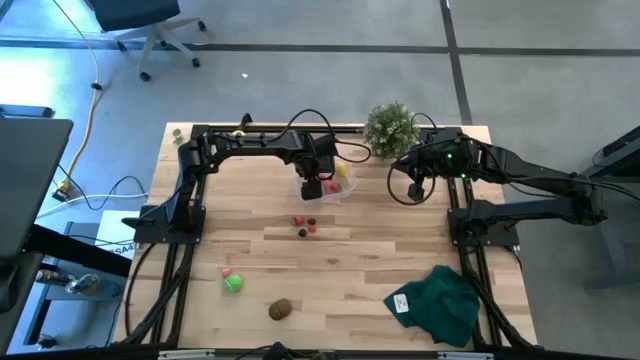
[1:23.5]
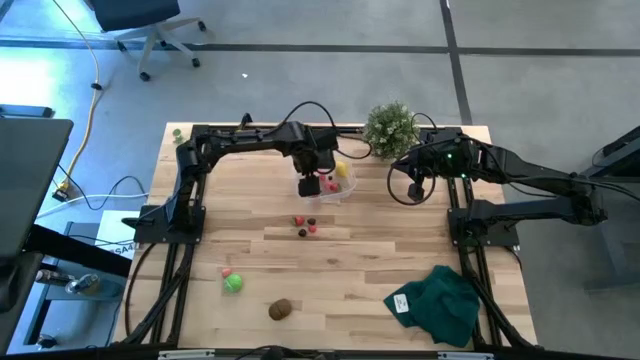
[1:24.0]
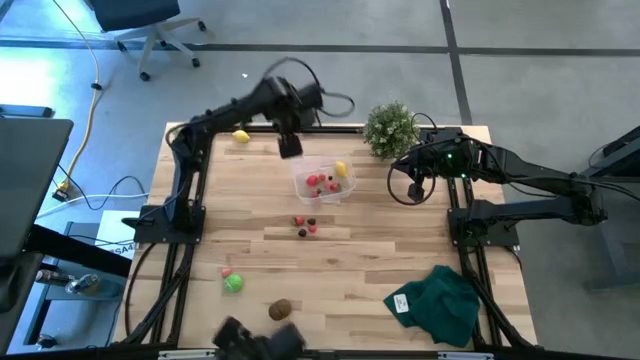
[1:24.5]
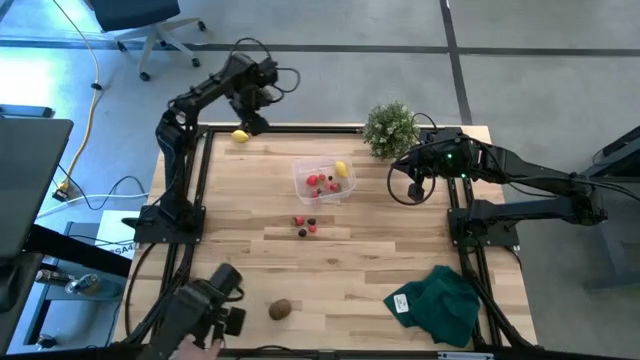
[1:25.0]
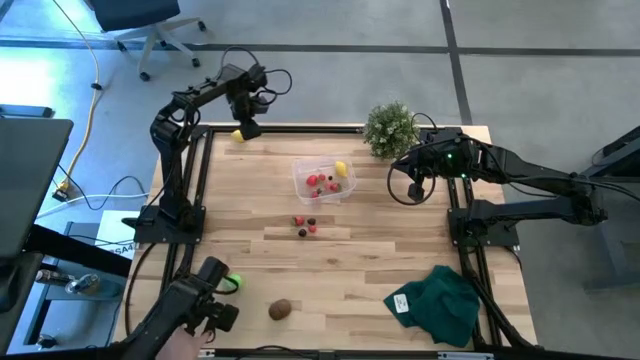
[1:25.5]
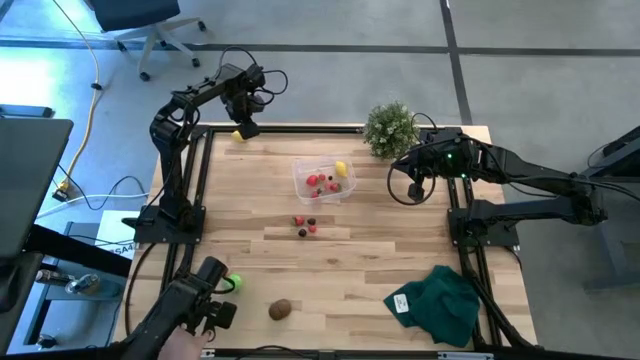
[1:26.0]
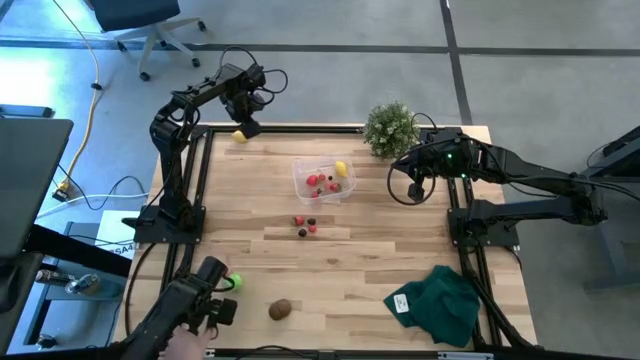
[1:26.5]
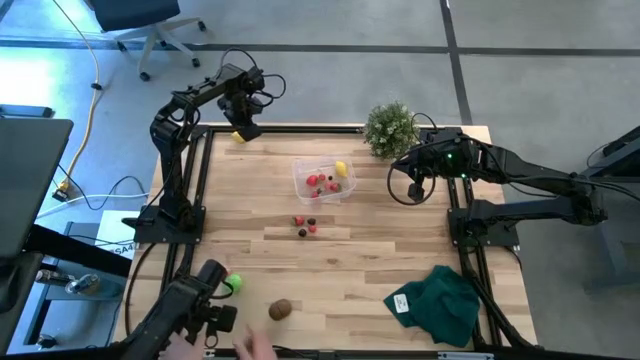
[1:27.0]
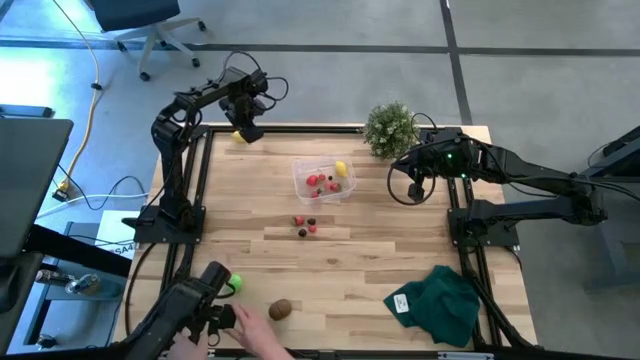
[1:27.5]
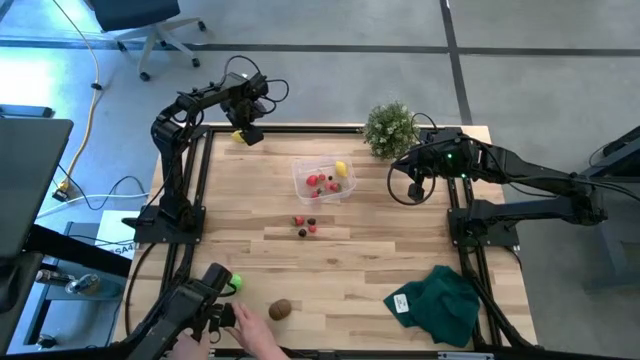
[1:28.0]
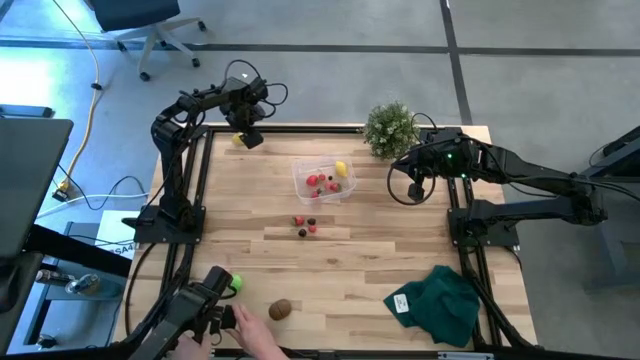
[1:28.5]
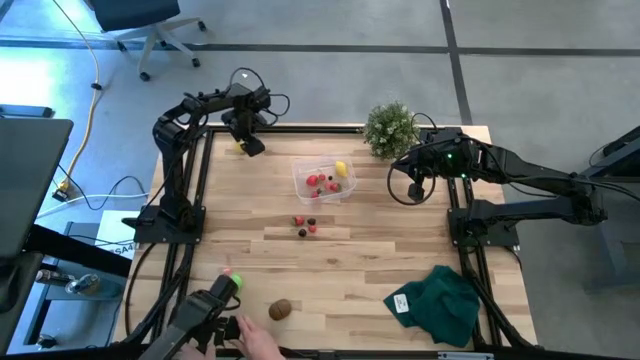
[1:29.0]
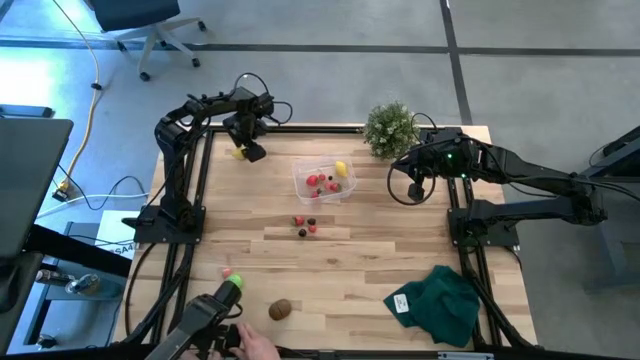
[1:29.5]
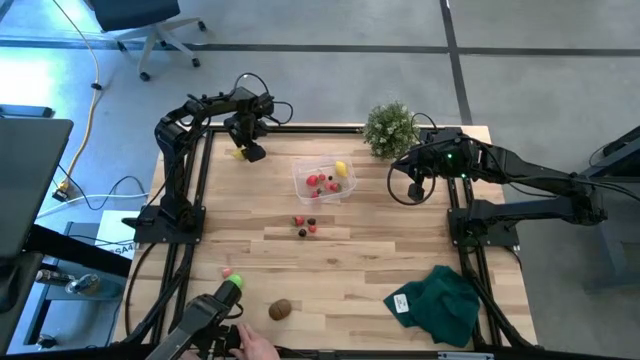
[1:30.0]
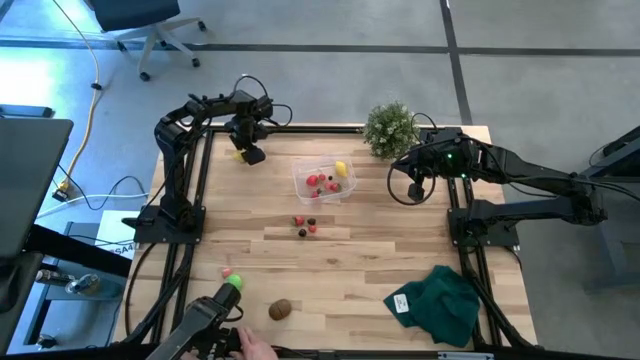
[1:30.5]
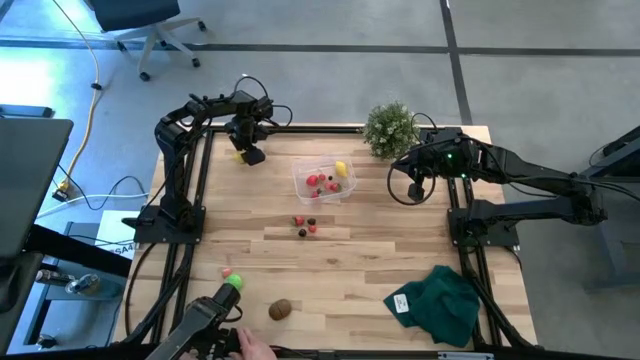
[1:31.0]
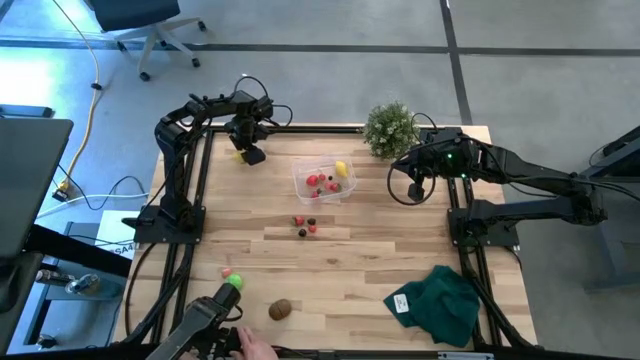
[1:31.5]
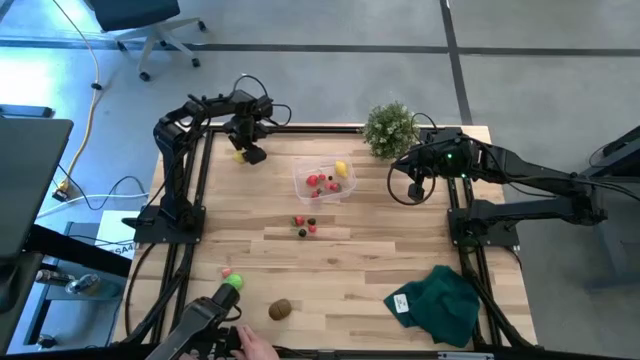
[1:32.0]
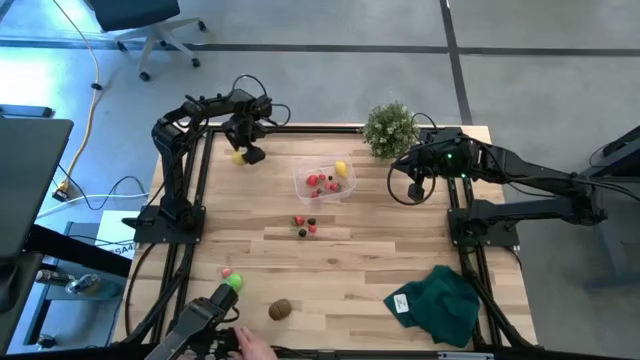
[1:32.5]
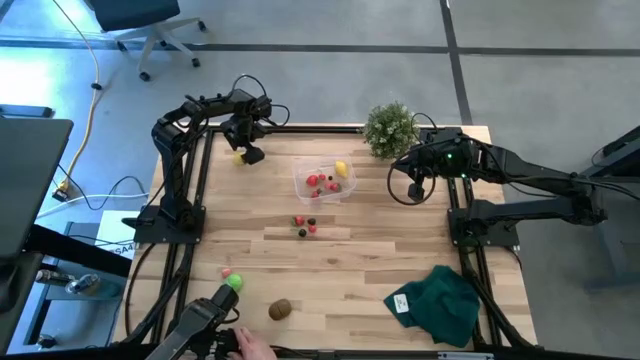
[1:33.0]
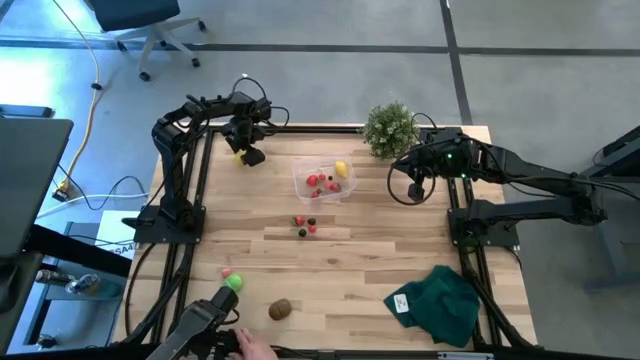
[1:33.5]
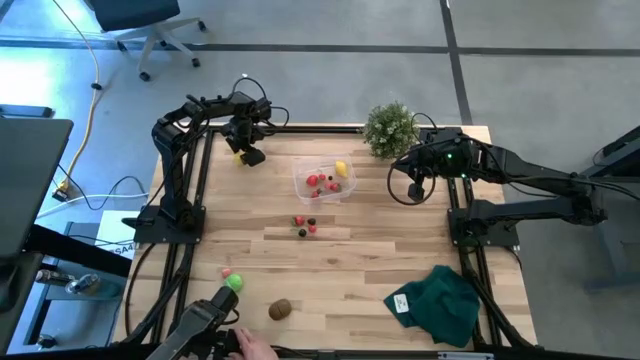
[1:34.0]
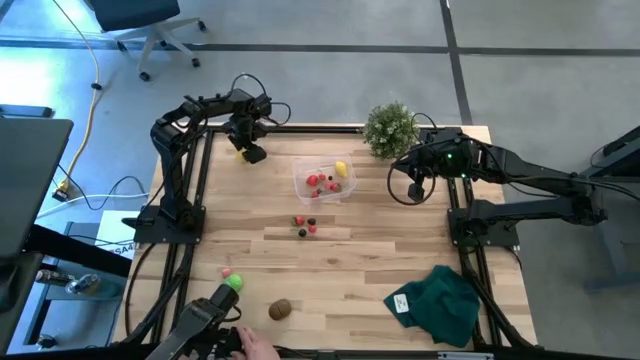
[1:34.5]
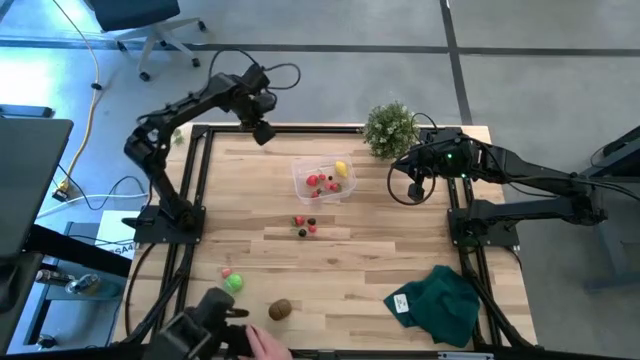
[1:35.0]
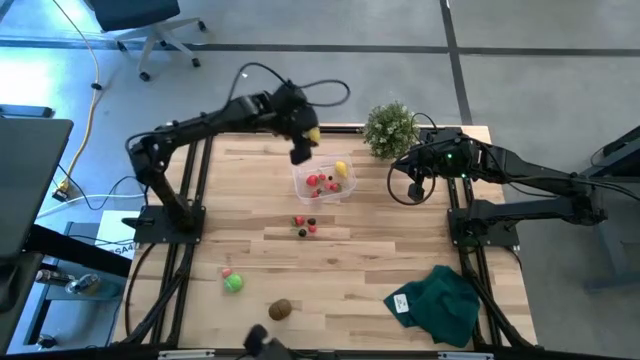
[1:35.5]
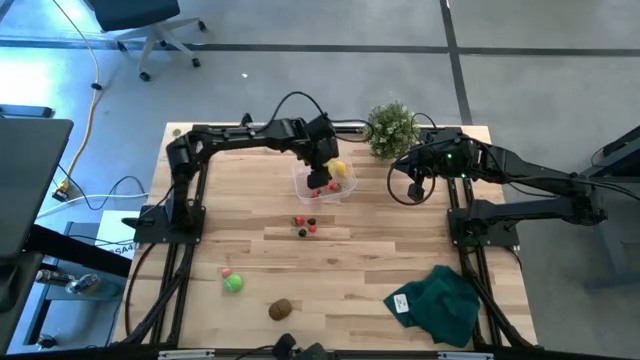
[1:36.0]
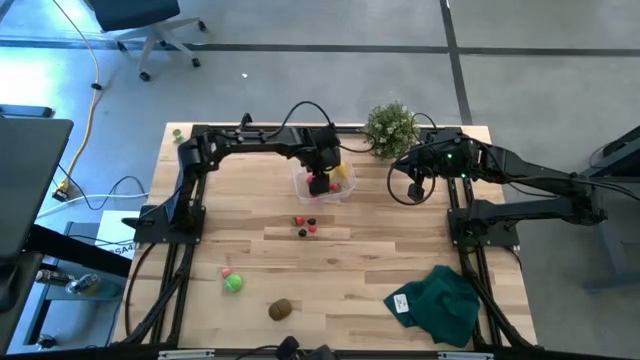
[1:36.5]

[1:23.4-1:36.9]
Task: Pick and placing Produce into tupperware
Put the yellow lemon into the transparent bin

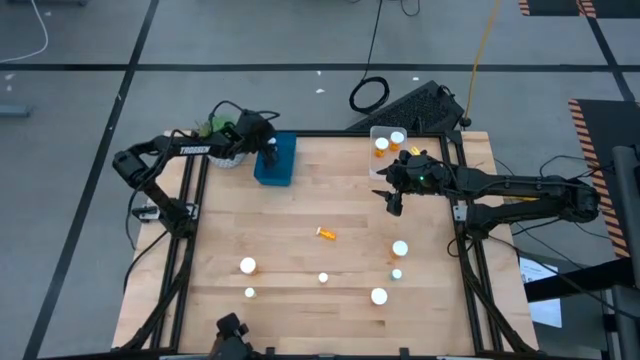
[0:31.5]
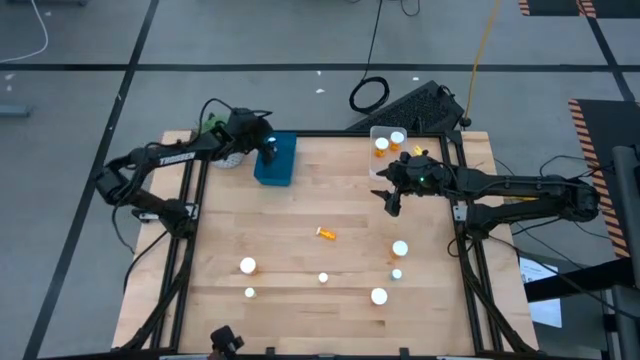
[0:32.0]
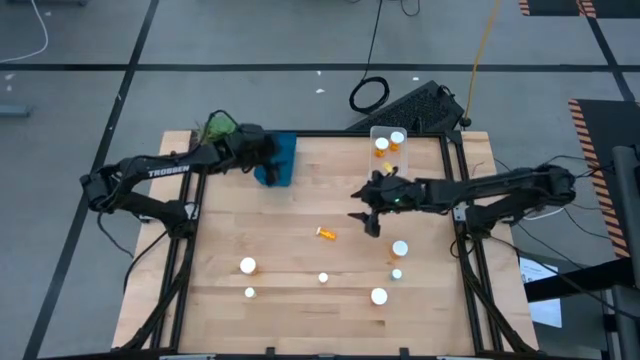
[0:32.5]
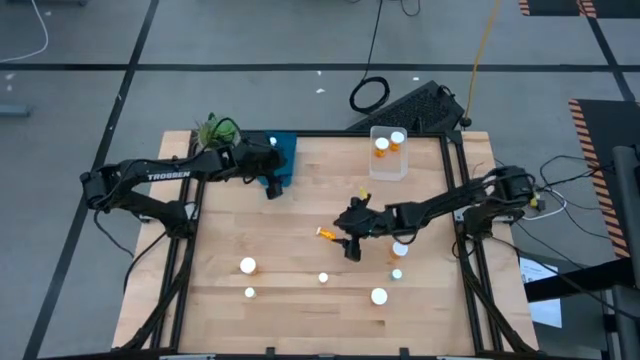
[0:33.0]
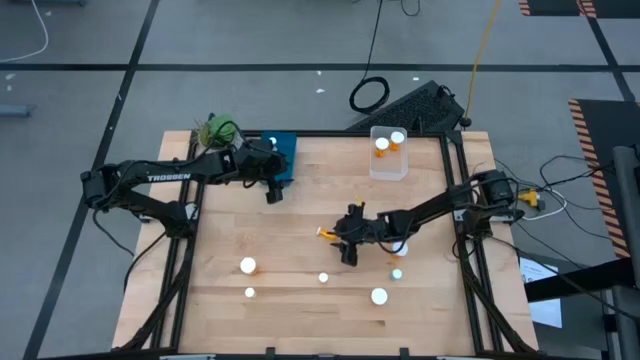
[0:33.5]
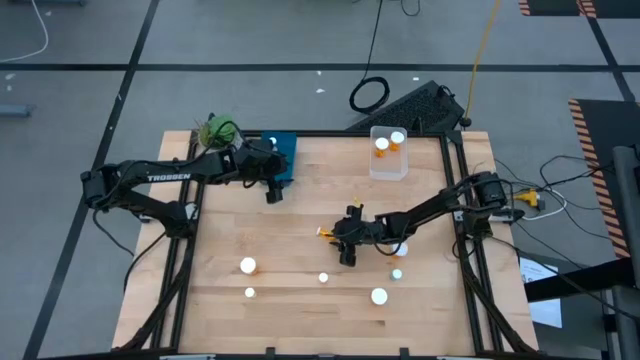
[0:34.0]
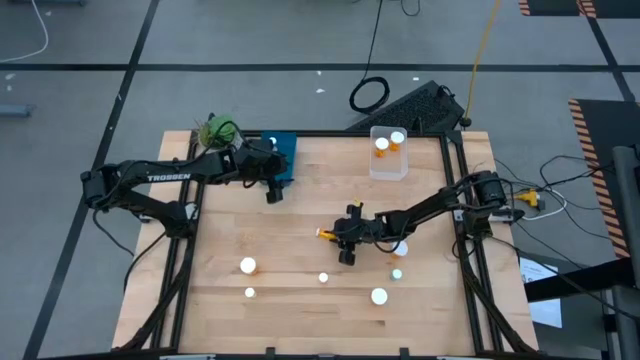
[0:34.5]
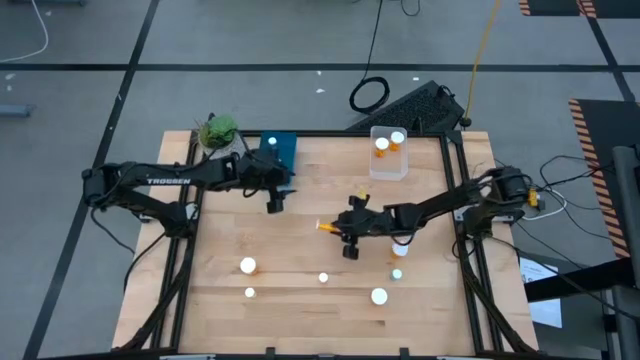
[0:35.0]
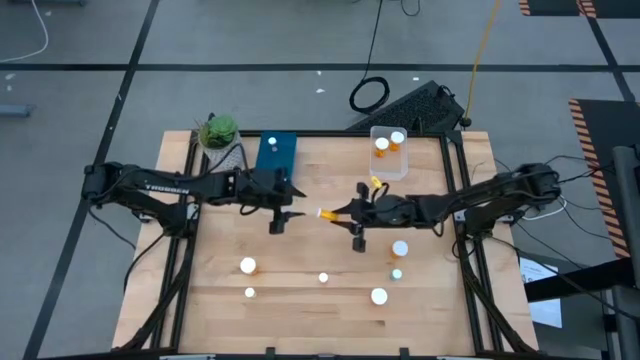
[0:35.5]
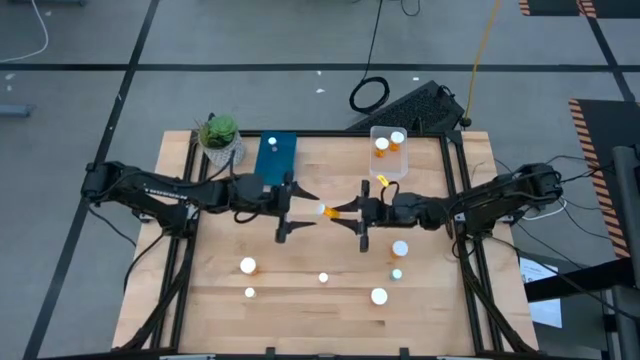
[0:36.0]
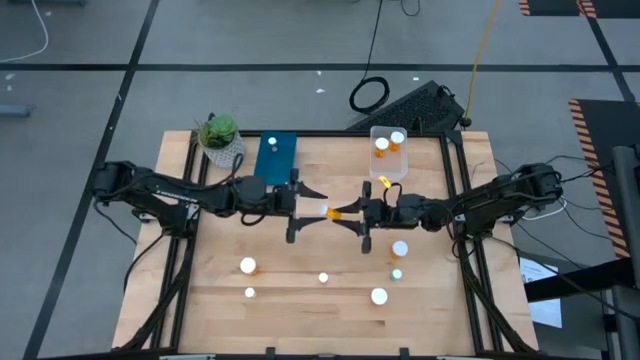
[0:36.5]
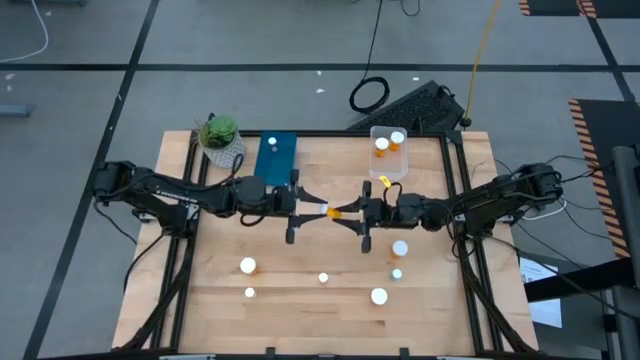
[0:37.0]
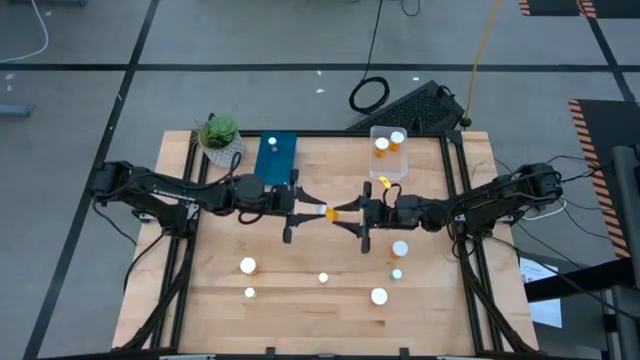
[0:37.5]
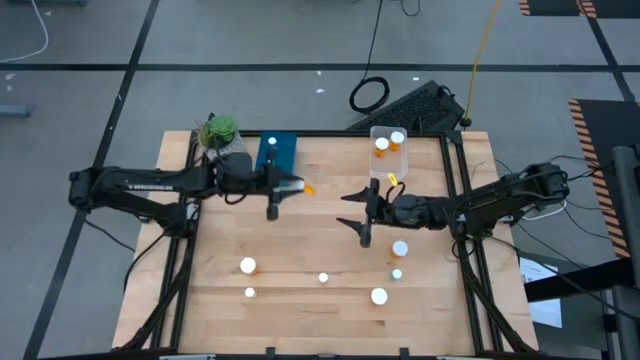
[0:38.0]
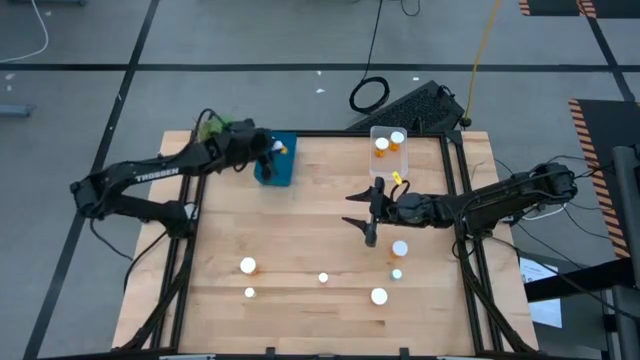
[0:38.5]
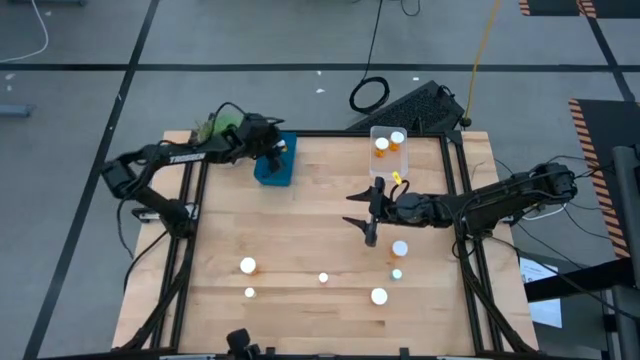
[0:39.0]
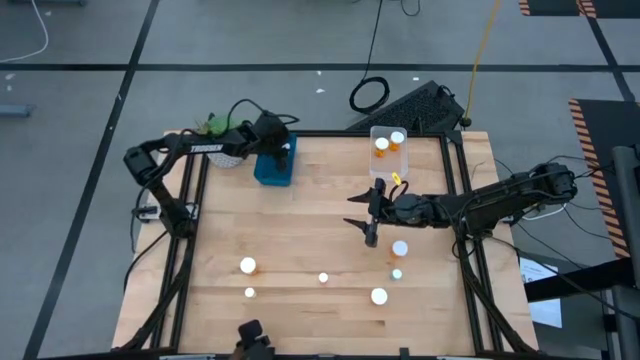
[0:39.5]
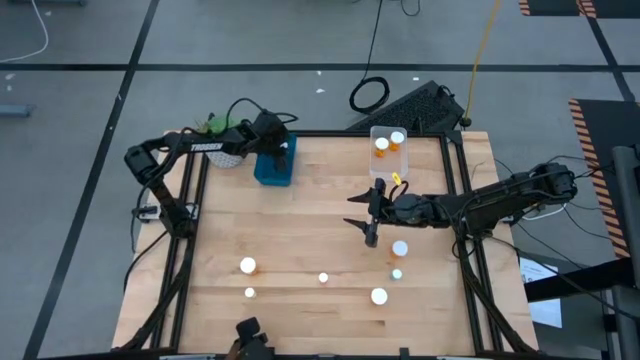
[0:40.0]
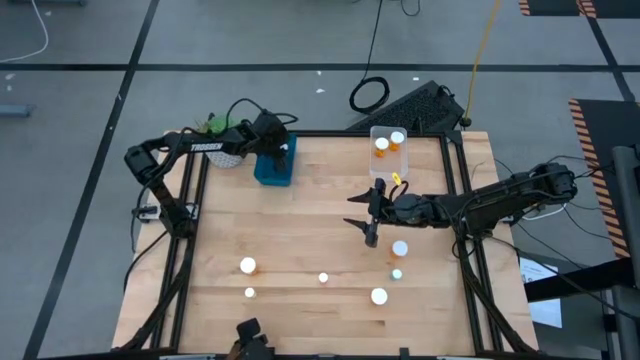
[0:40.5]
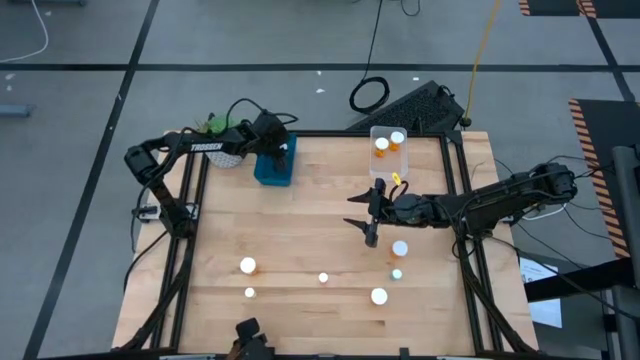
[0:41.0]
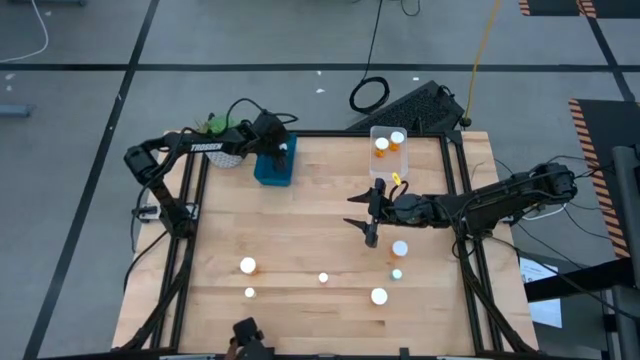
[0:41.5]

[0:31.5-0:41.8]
Task: Pick and place medicine bottles into bin by pill shape (circle, oval)
Put the orange bottled tablets into the blue bin
